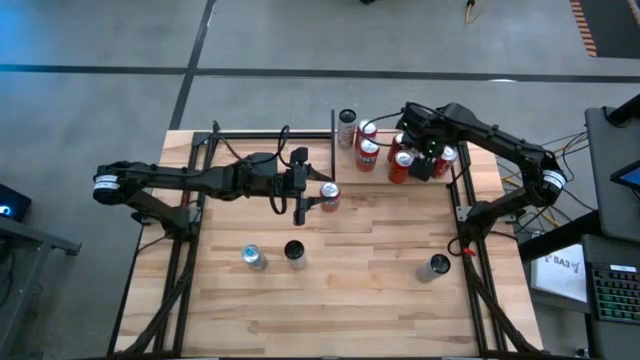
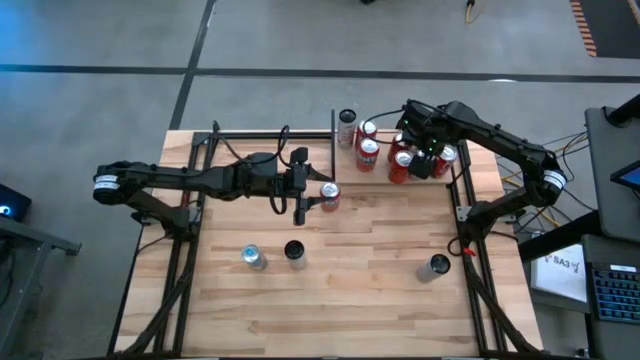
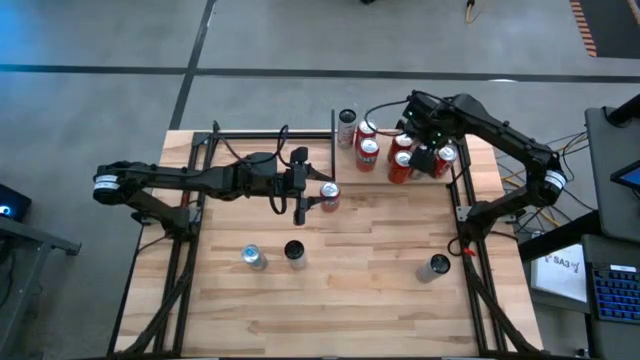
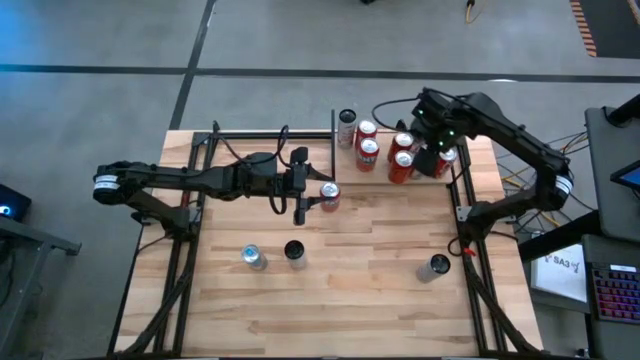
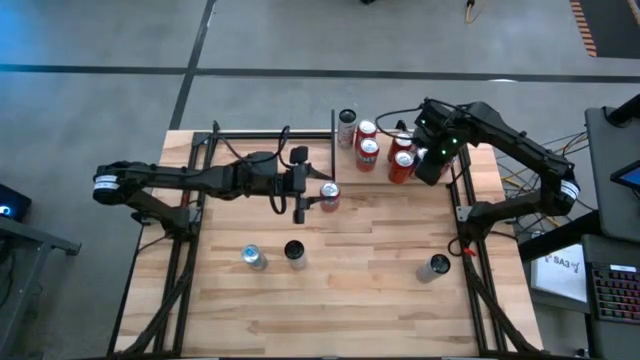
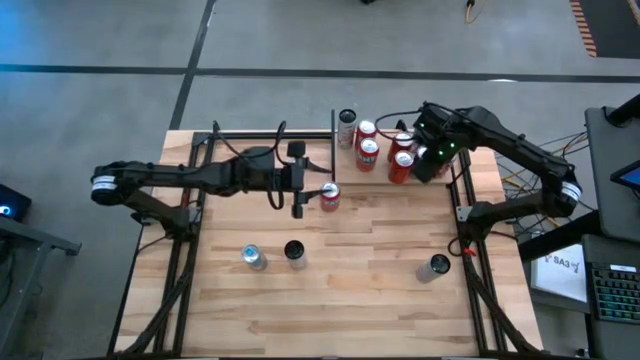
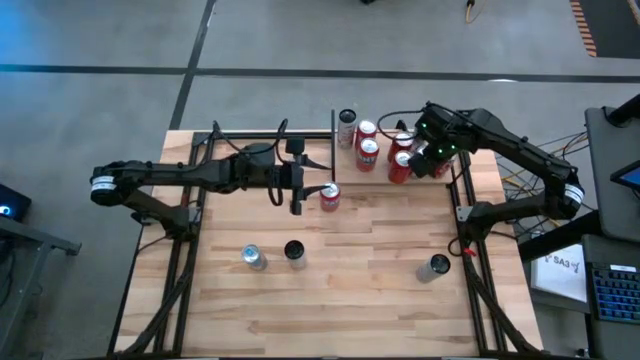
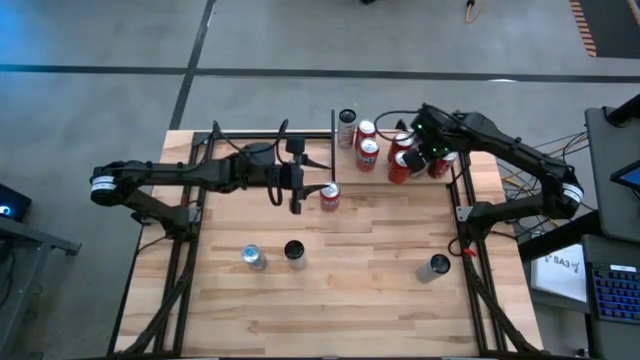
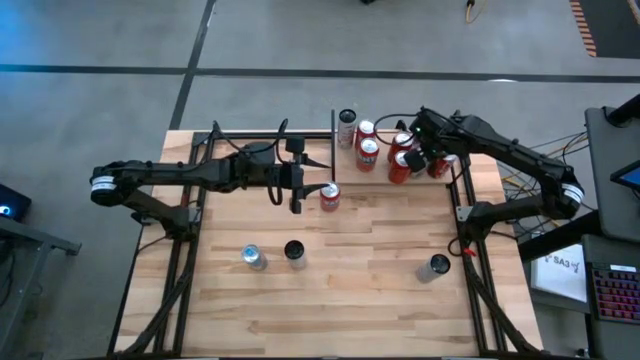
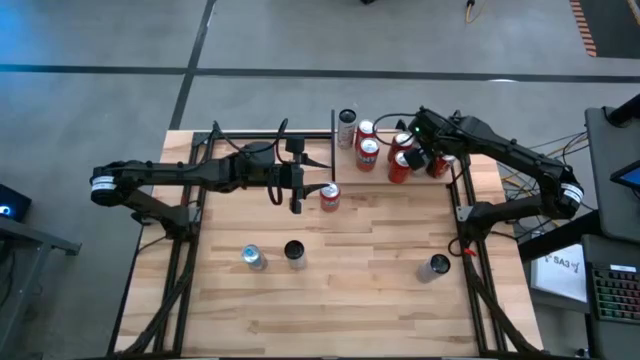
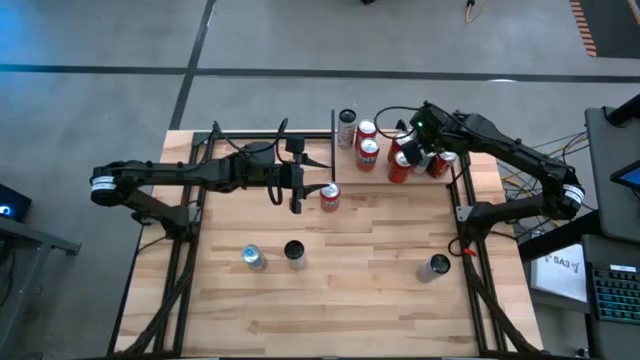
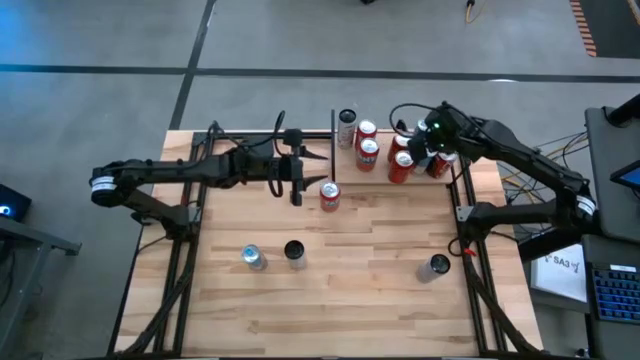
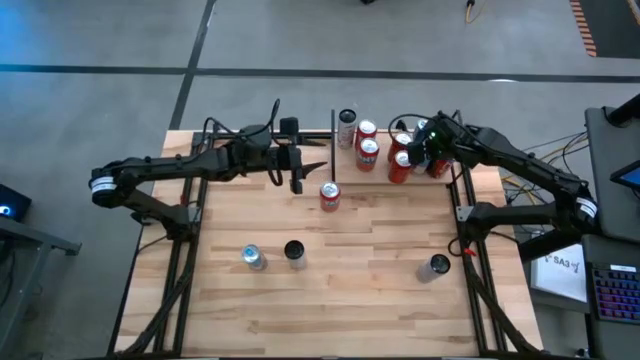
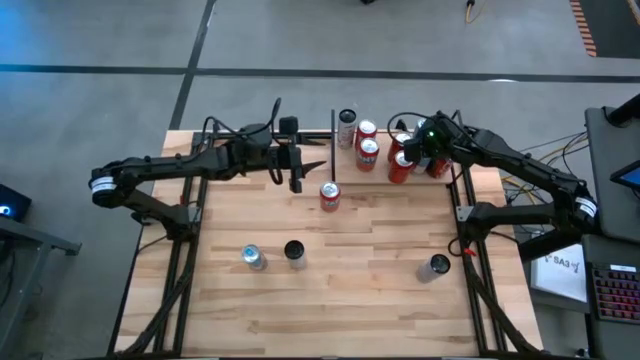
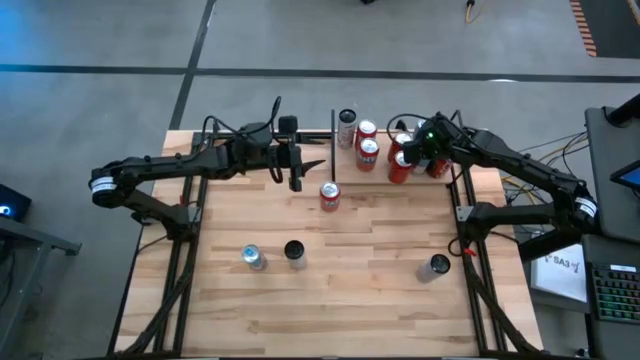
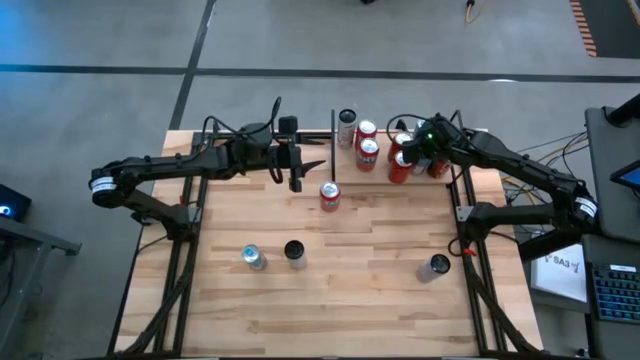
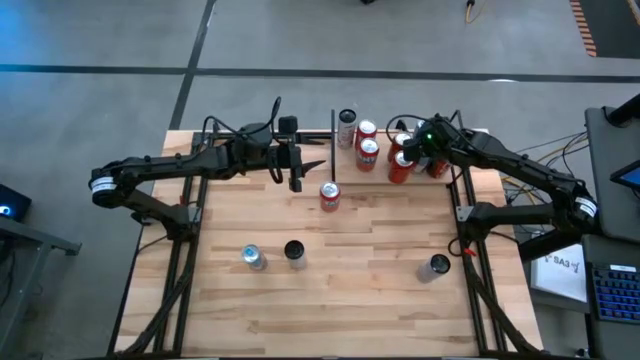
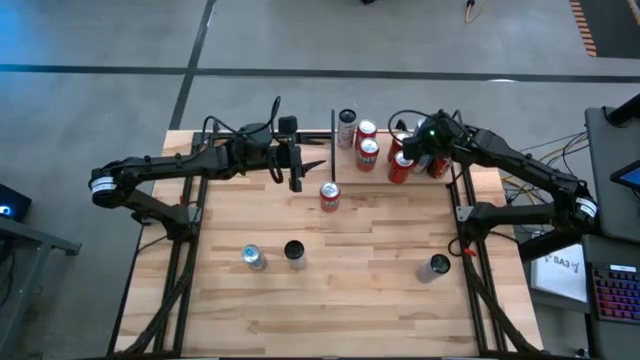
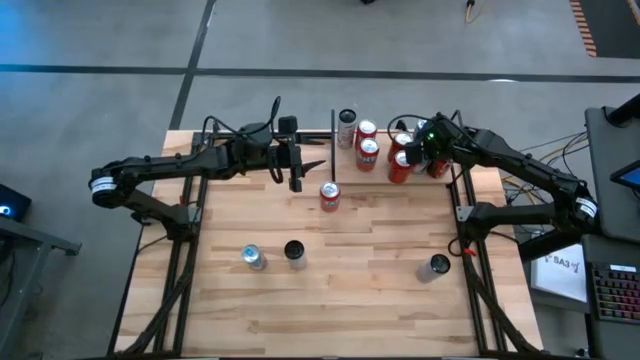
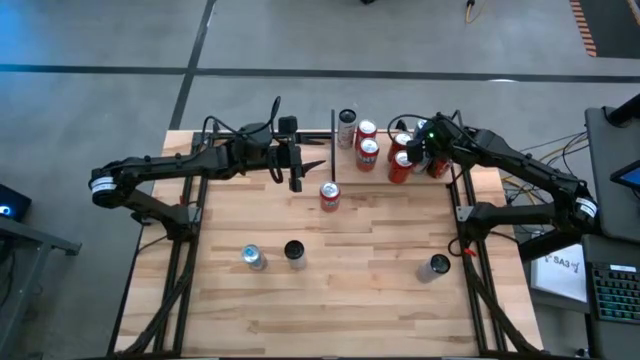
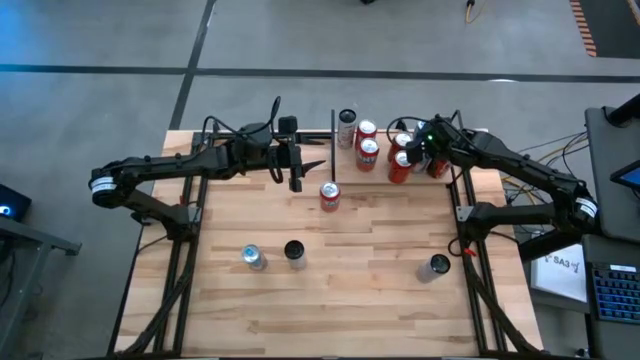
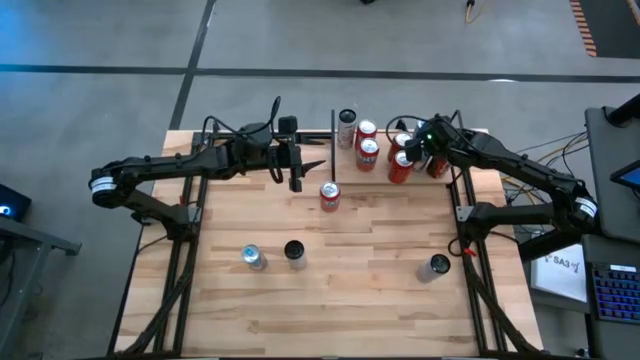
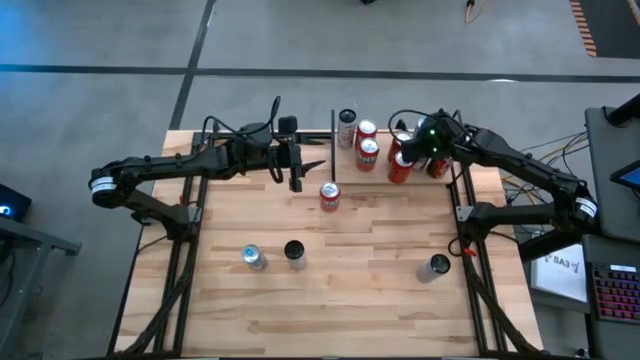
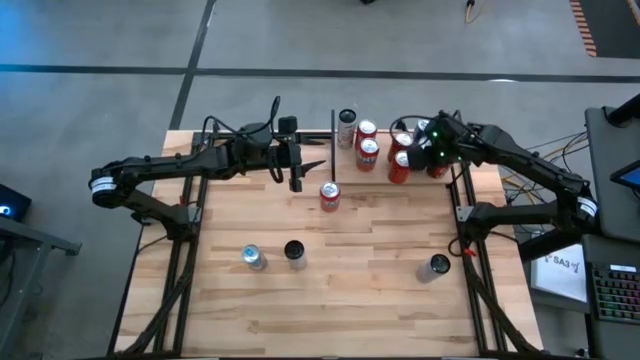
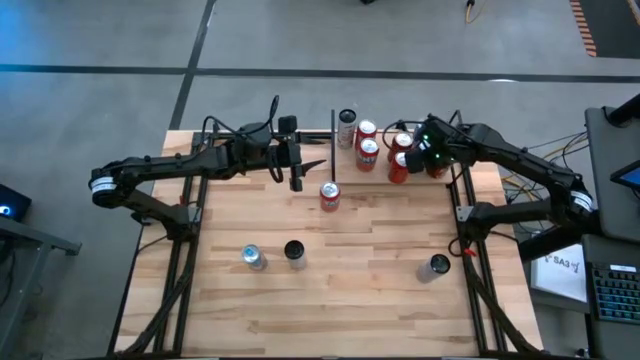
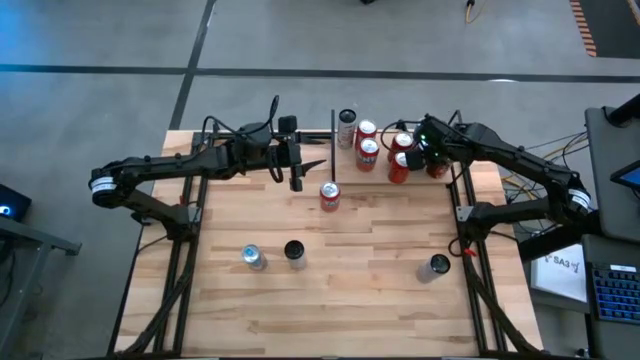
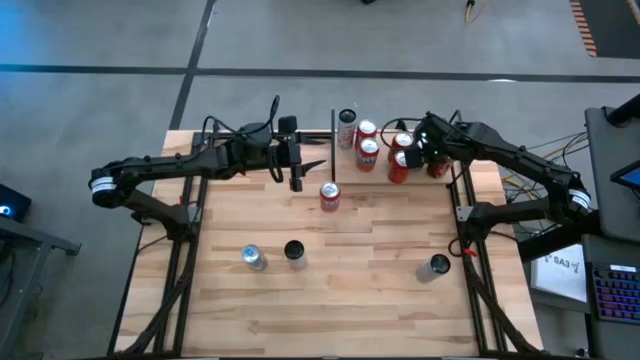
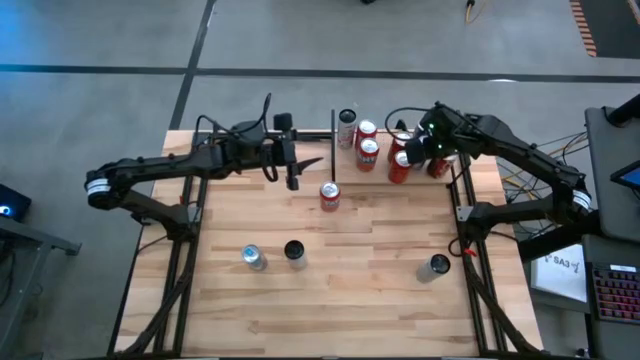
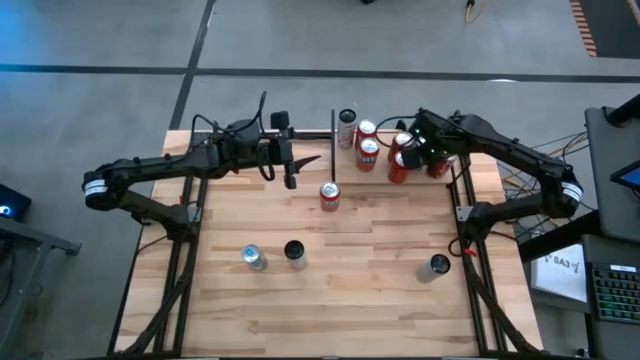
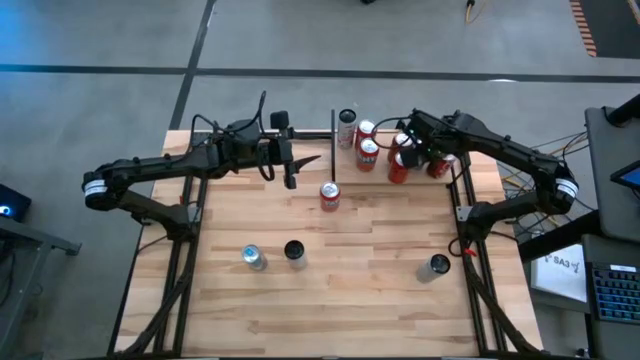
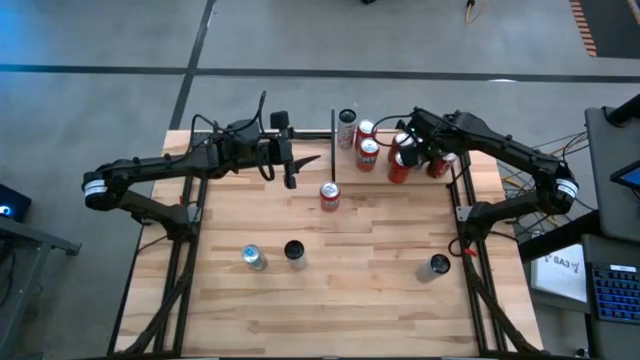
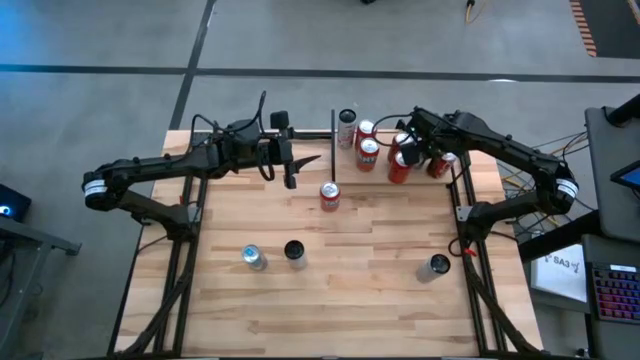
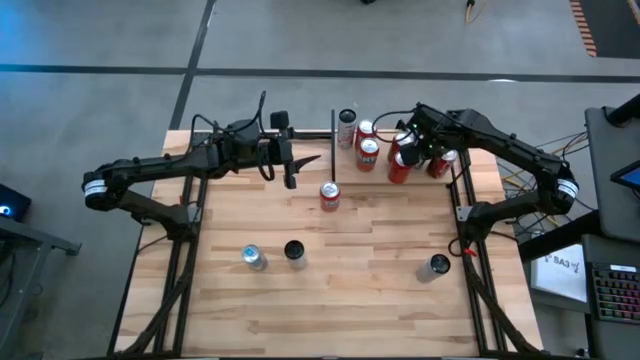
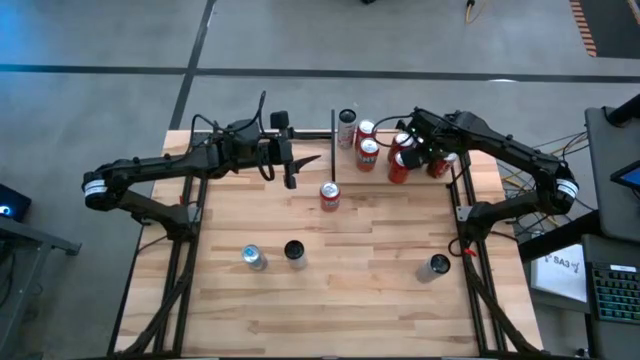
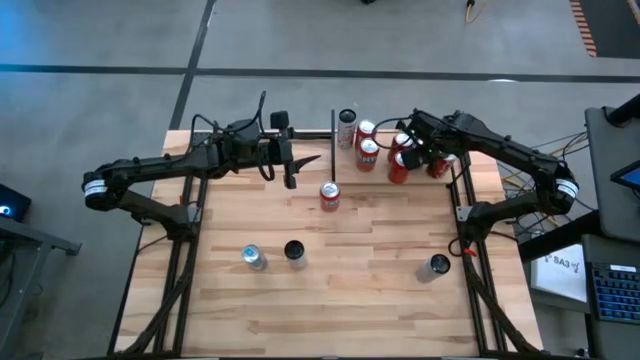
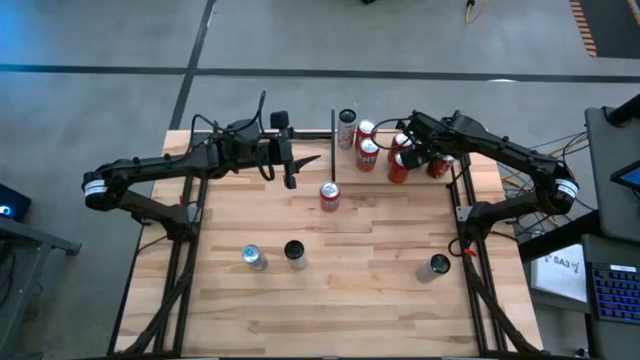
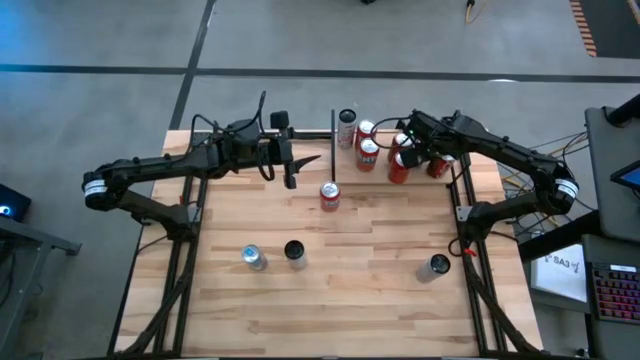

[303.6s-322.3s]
Task: Place canned beverage on shelf
Put the right blue soda can on the shelf aligned with the other blue soda can

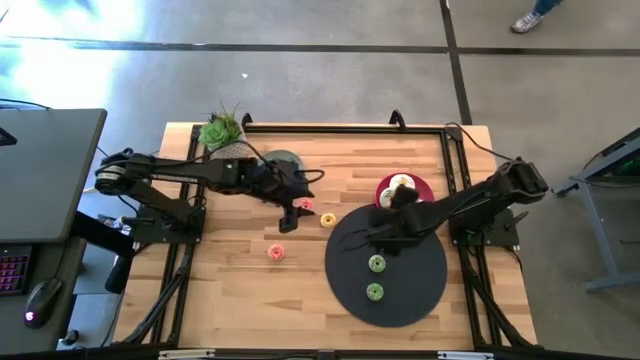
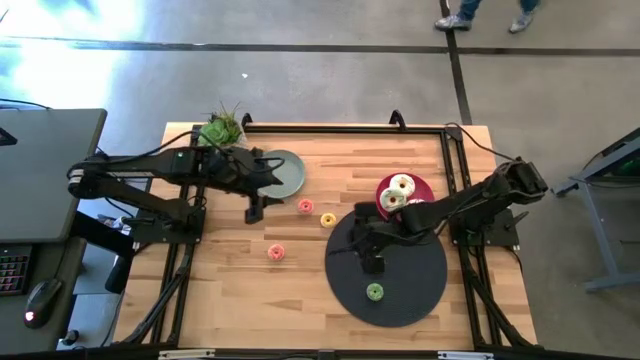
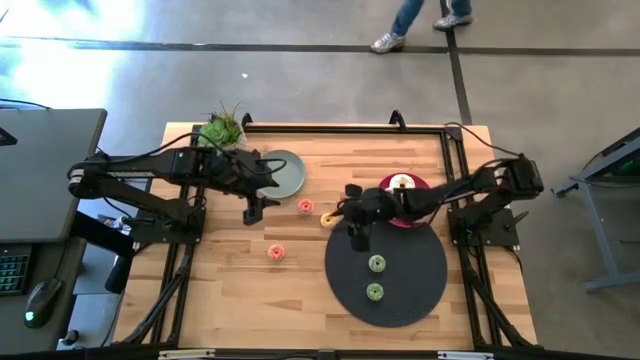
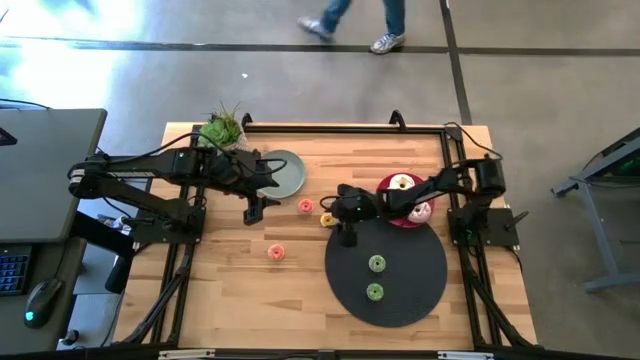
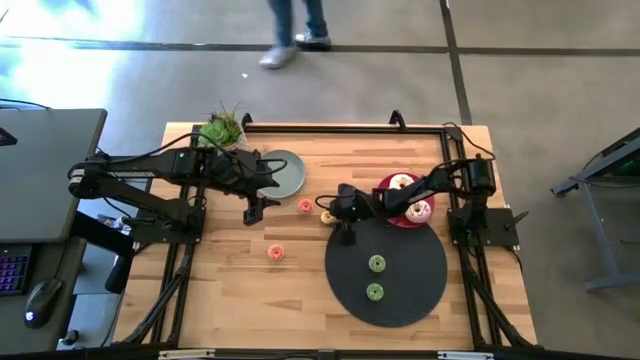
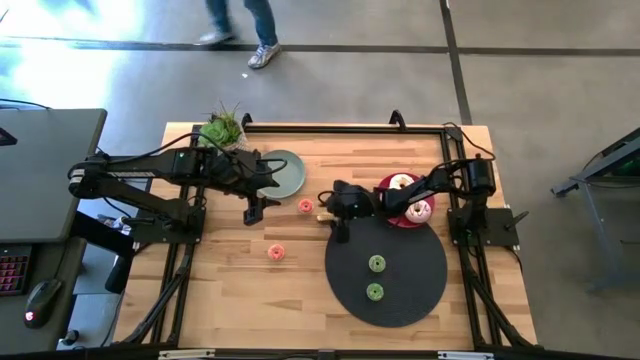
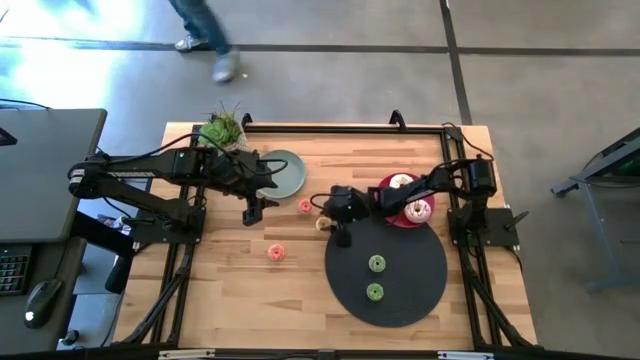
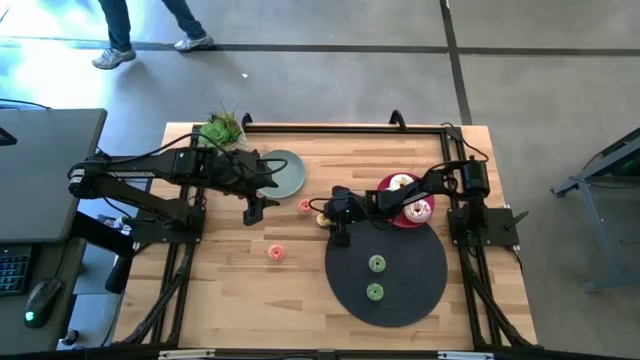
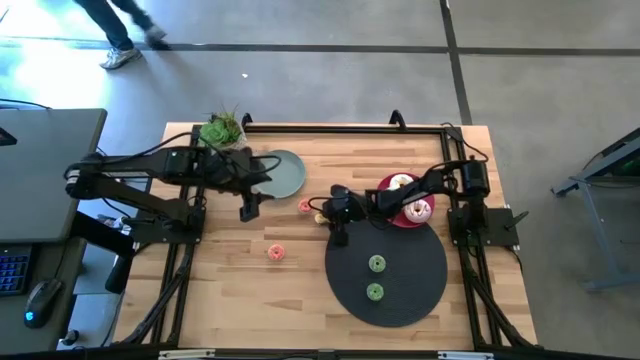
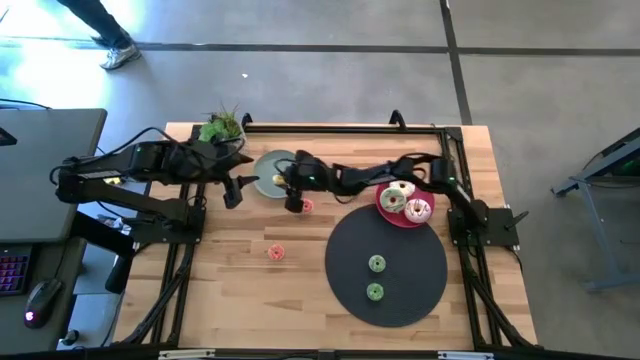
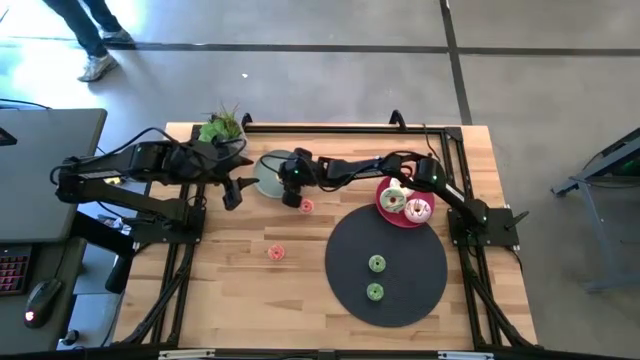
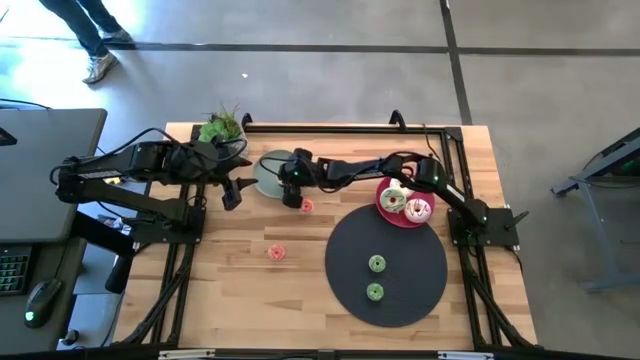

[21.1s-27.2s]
Task: Pick & Place donuts
Put the small yellow donut on the gray plate
